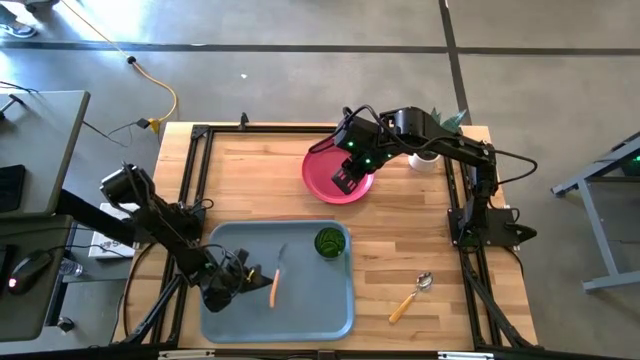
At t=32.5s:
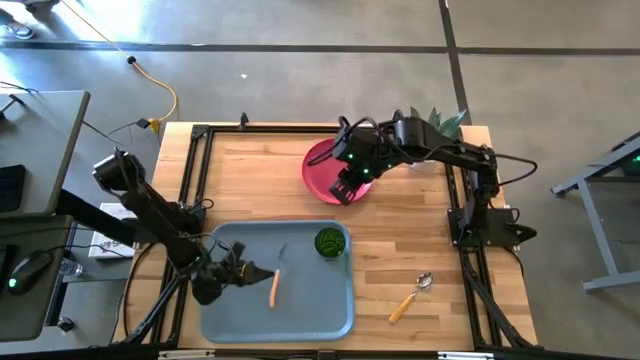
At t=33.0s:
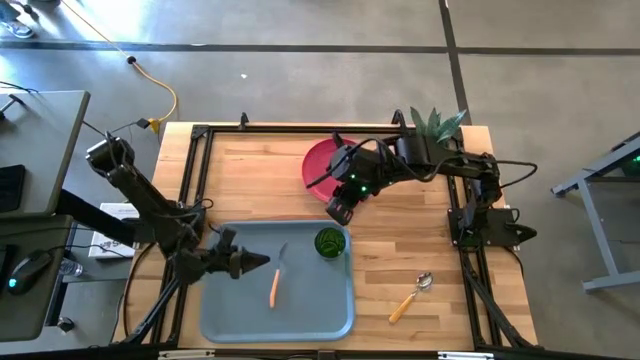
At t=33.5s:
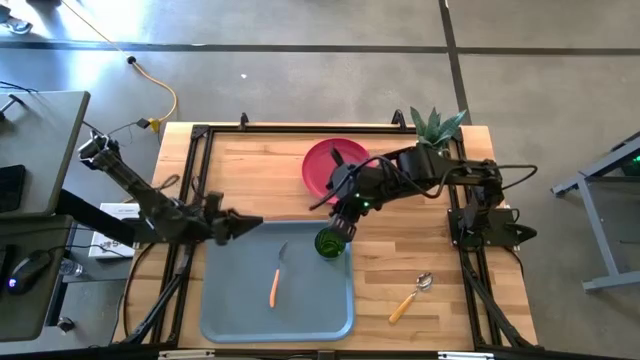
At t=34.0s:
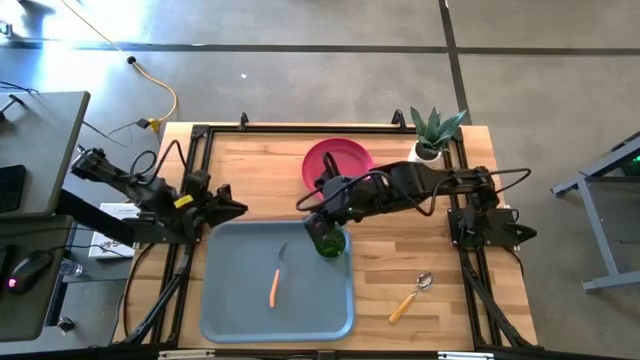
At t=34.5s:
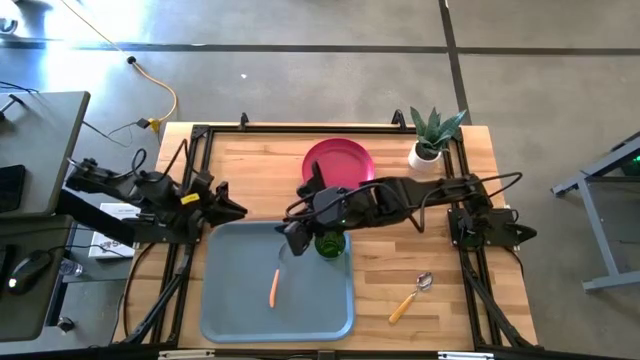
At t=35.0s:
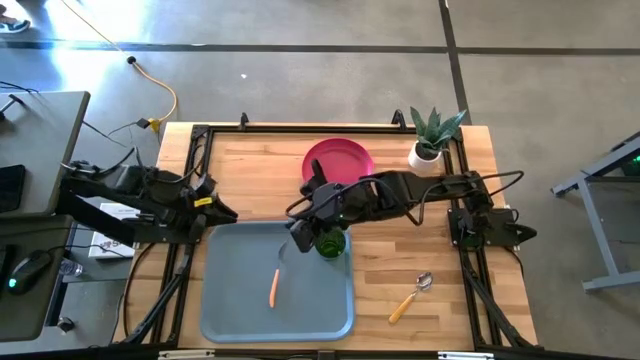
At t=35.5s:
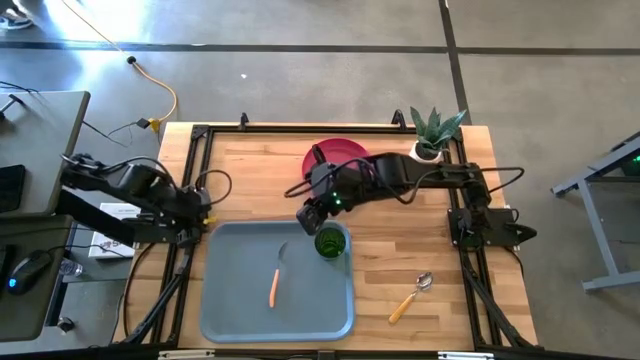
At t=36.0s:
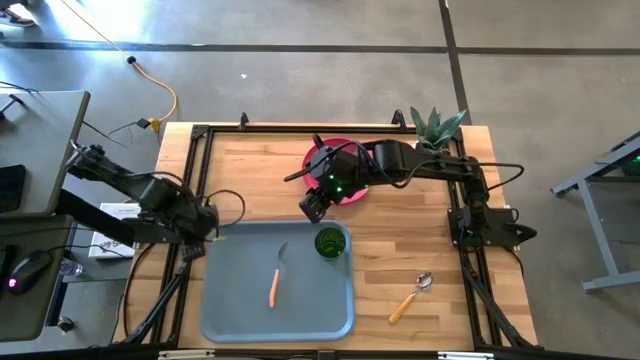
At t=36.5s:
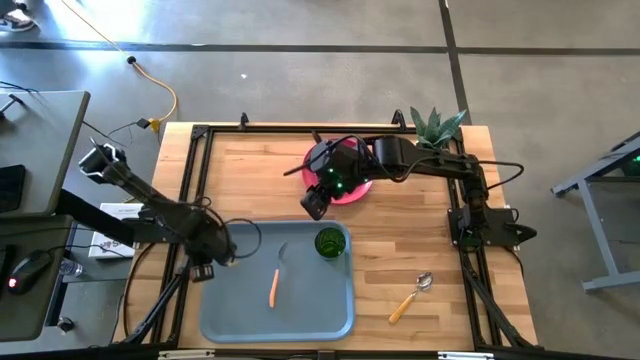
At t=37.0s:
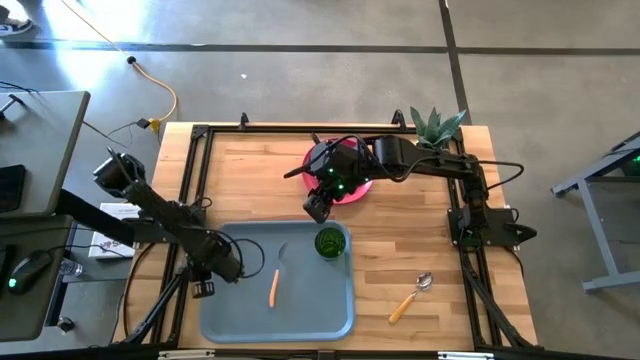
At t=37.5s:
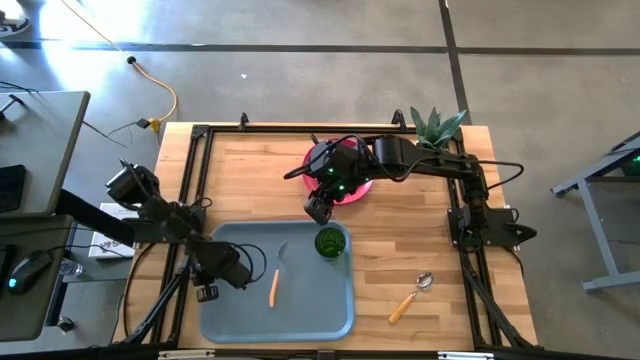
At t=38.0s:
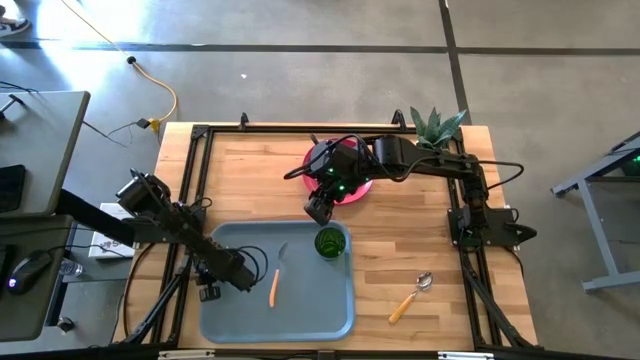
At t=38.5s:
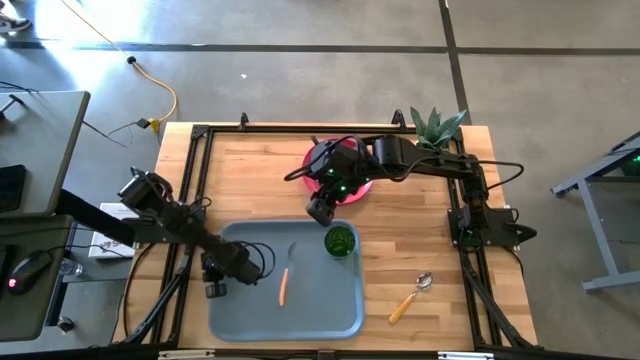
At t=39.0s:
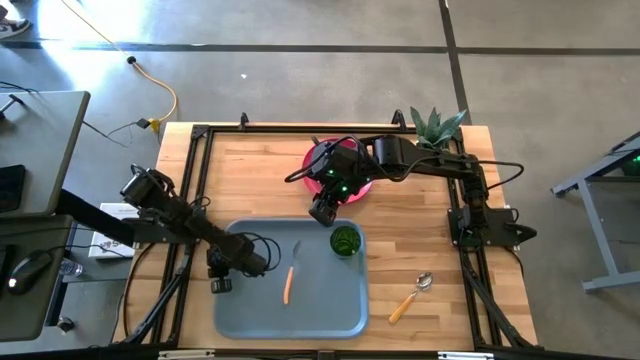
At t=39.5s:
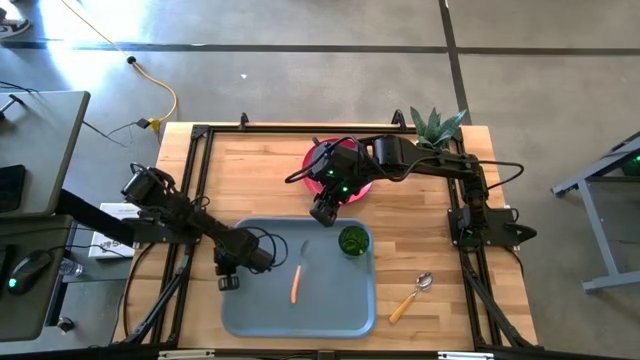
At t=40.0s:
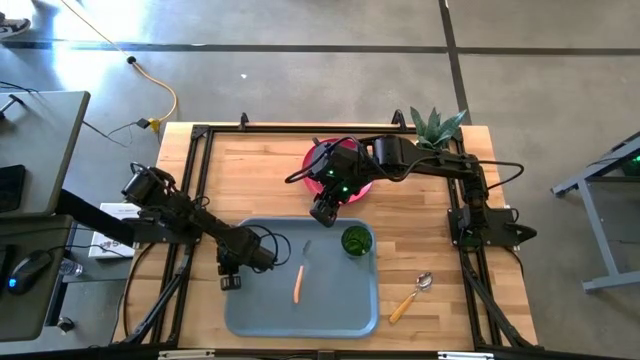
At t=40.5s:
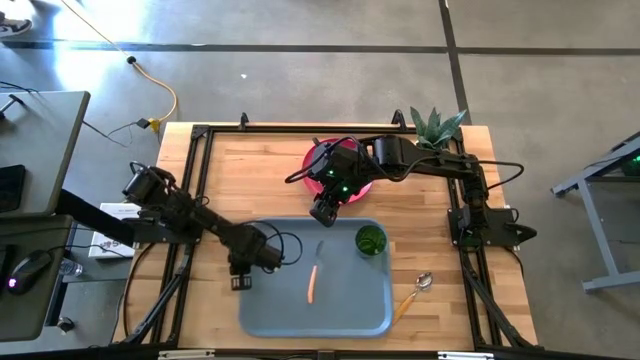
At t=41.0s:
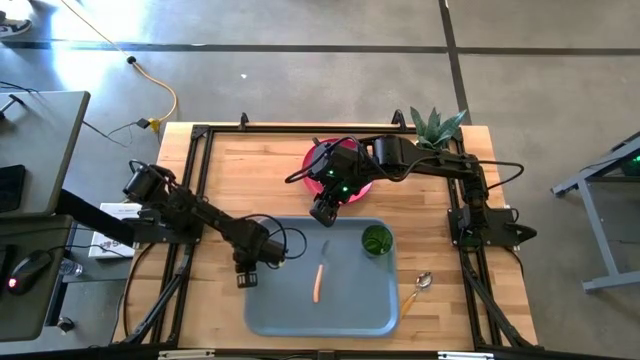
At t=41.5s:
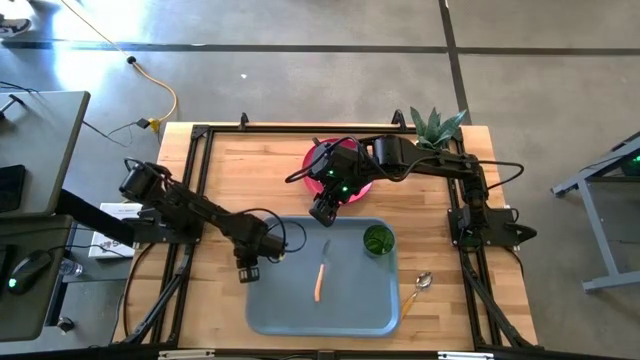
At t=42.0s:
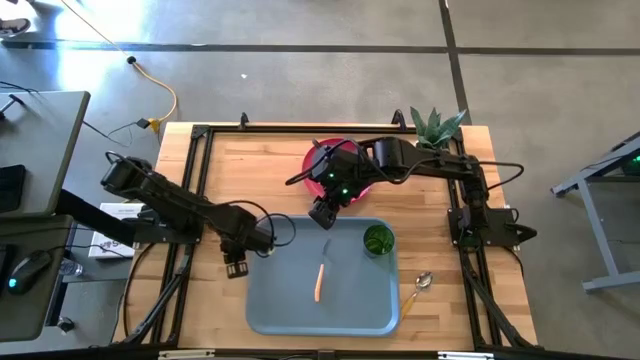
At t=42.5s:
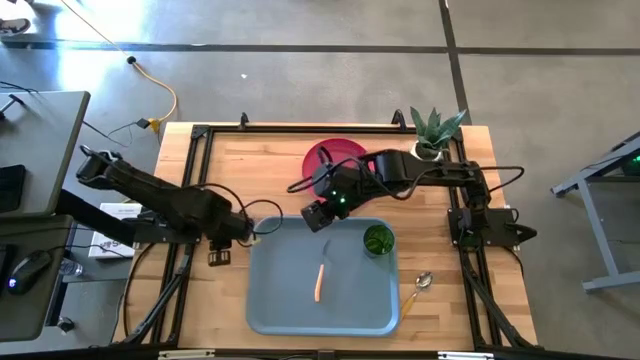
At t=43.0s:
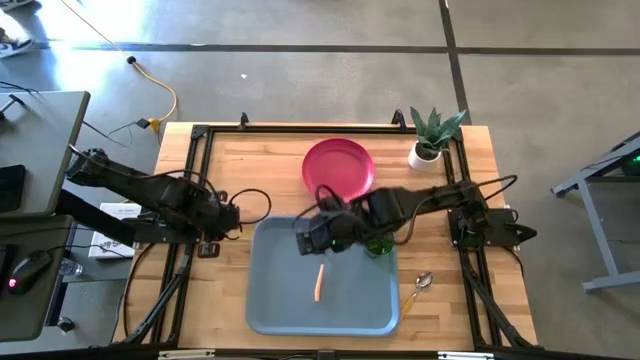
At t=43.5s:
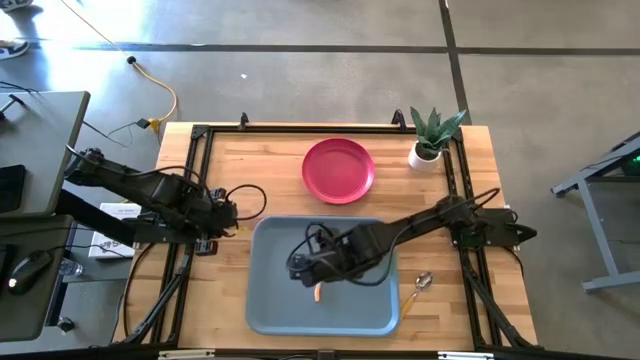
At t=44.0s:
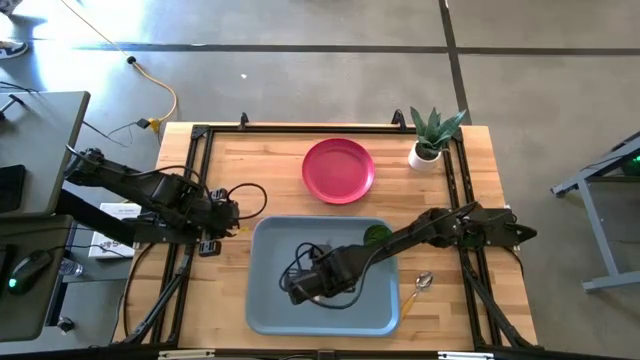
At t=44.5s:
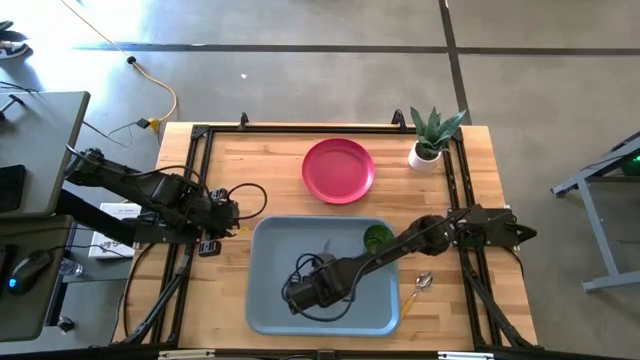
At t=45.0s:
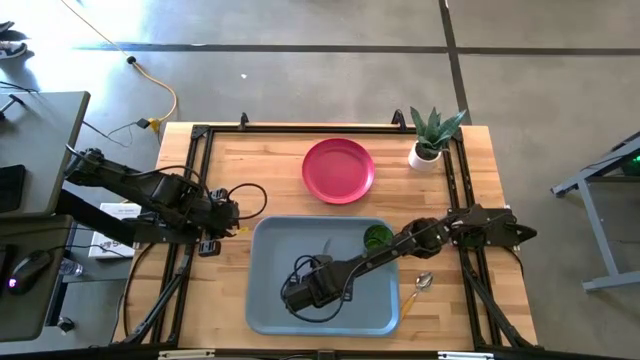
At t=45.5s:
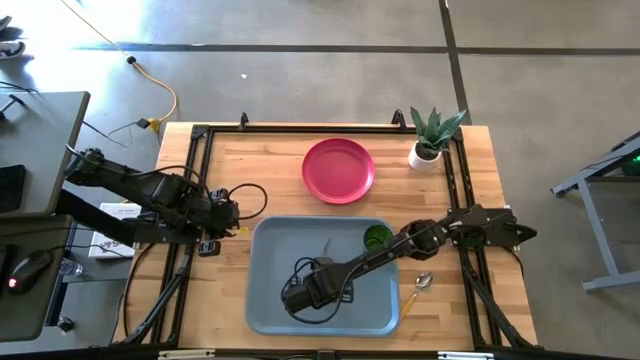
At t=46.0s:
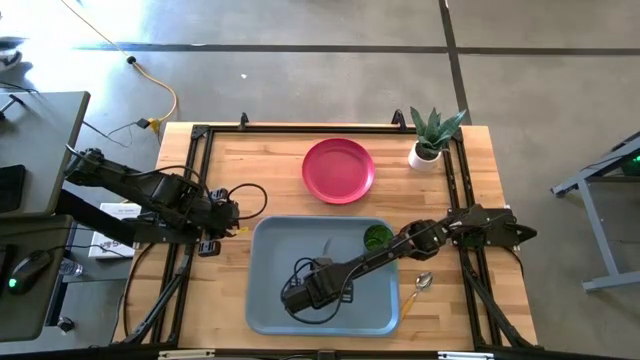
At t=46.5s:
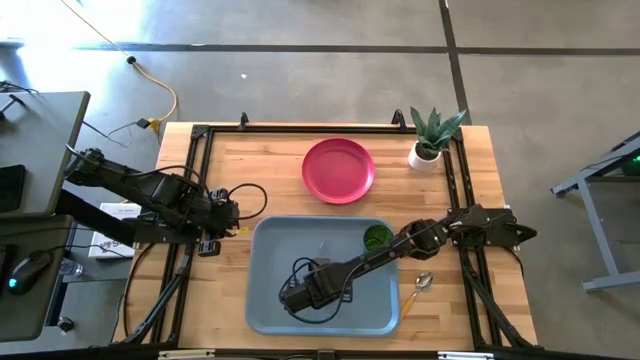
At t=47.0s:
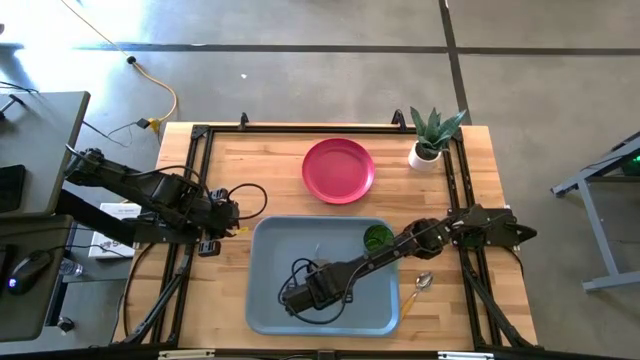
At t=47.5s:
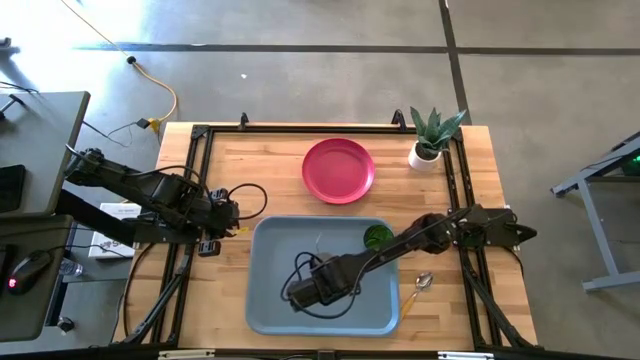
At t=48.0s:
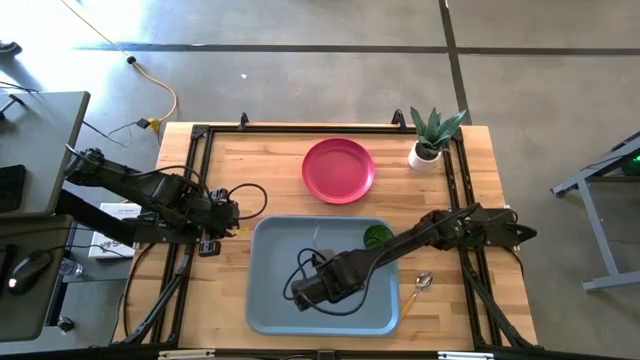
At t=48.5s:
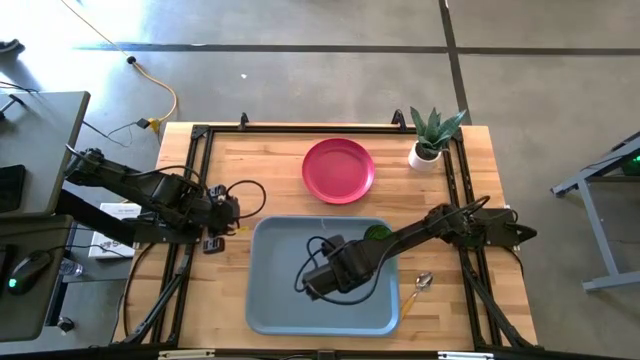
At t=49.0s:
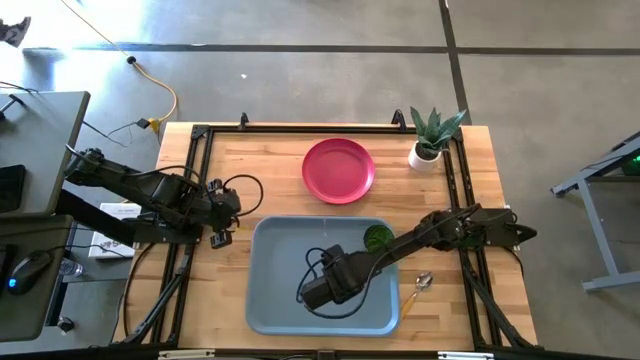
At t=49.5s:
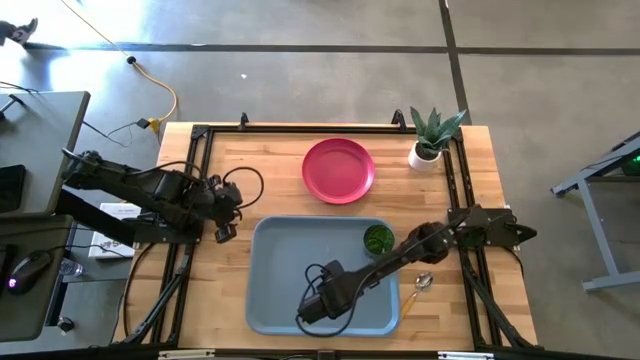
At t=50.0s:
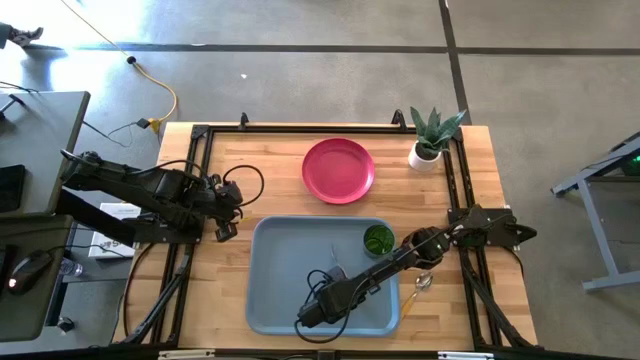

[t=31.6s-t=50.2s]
Task: Pick and place plate/cup/fork/spoon on tray
Put the orange fork on the blue serving tray to the bottom left of the green glass

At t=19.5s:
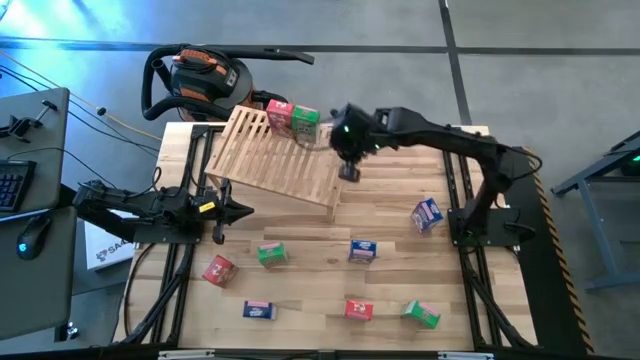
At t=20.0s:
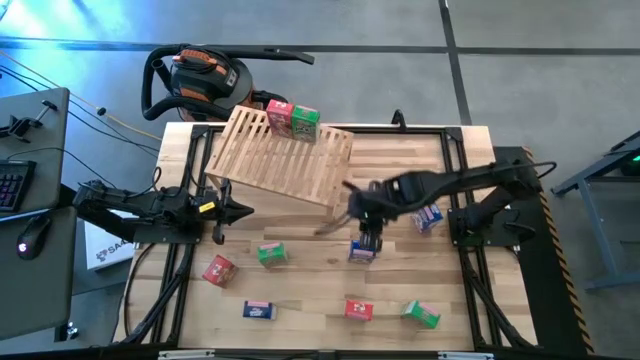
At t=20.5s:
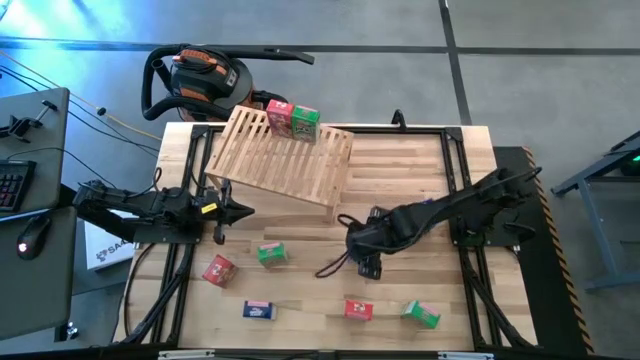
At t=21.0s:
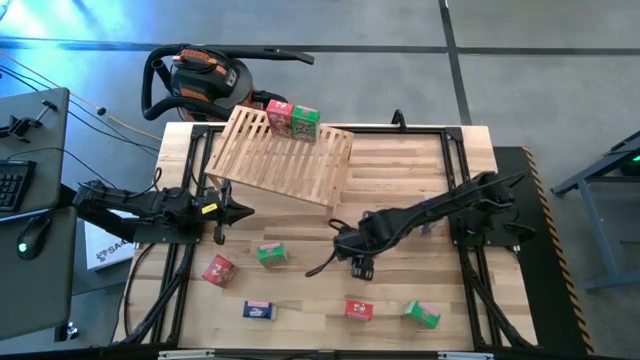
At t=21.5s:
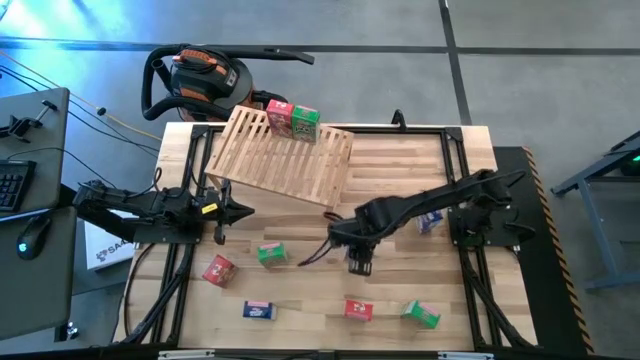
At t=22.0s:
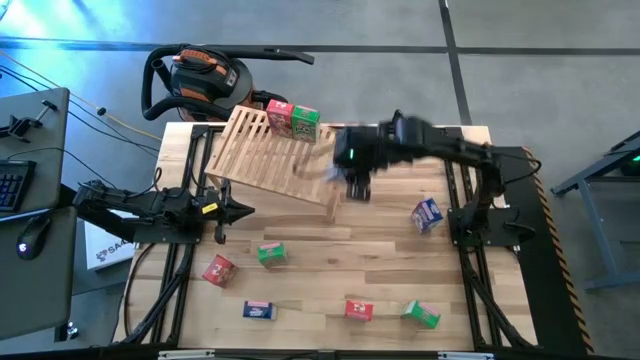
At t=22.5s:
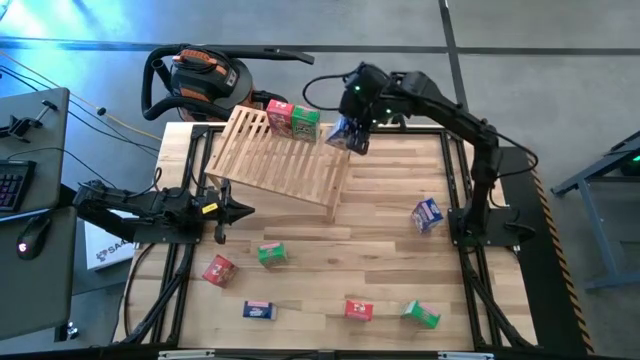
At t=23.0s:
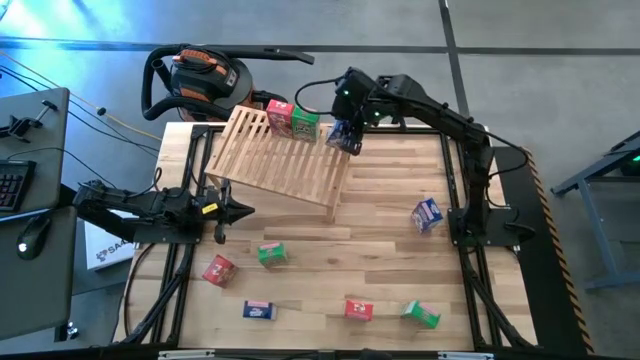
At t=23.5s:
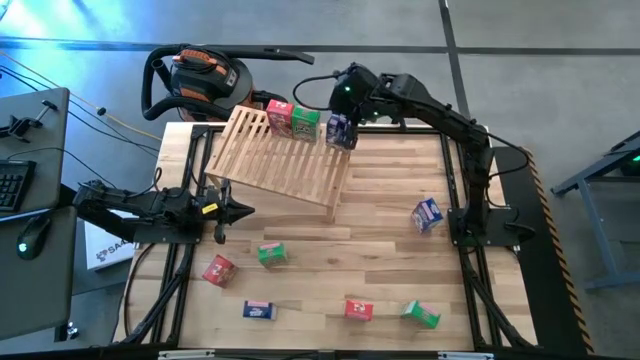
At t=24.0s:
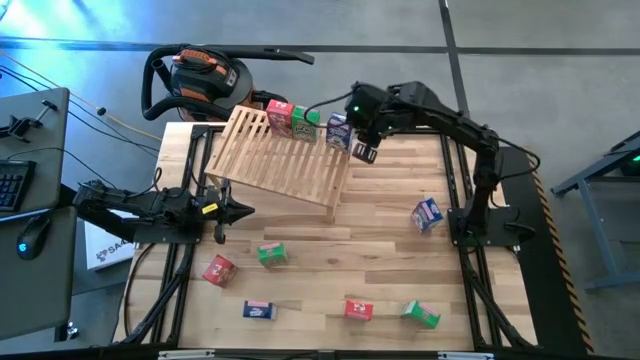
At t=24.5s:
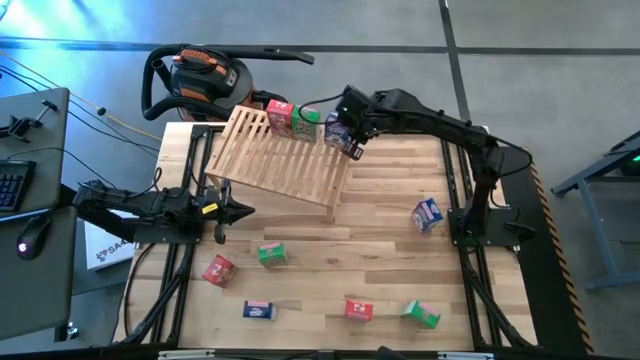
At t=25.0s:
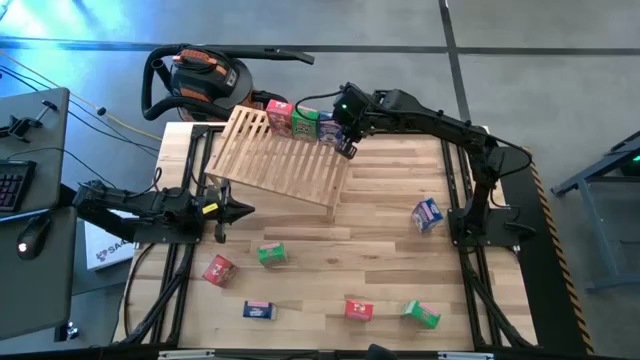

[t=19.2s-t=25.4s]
Task: Stack cereal on shelf
Put the middle blue cereal box on the shelf
